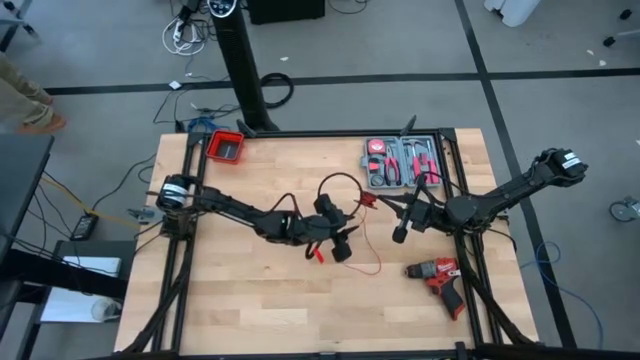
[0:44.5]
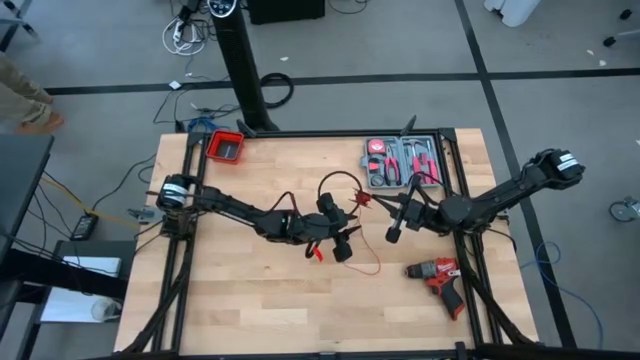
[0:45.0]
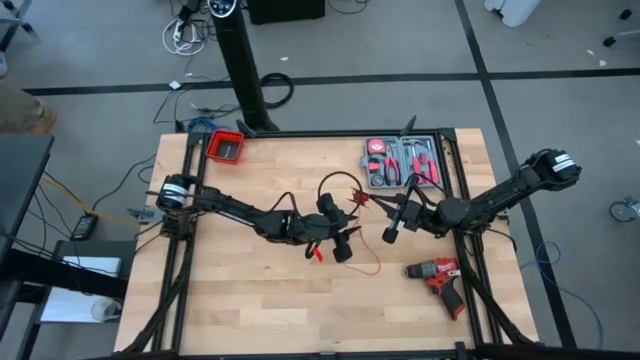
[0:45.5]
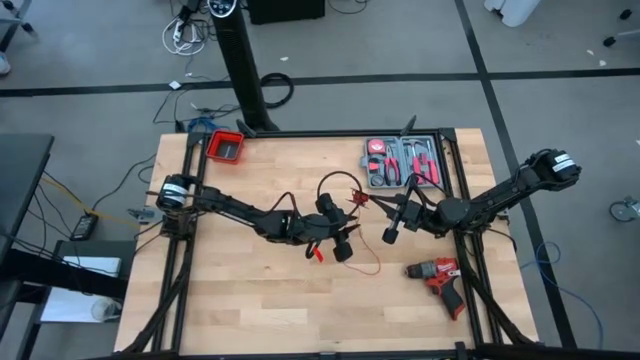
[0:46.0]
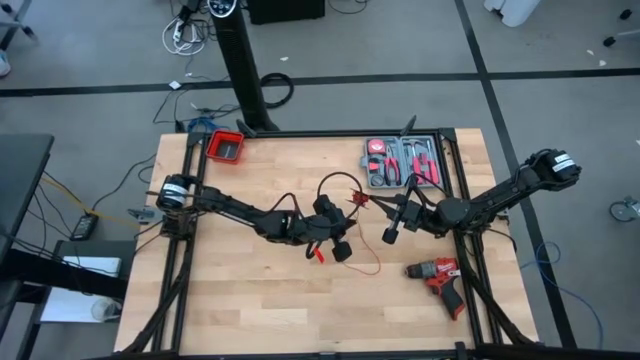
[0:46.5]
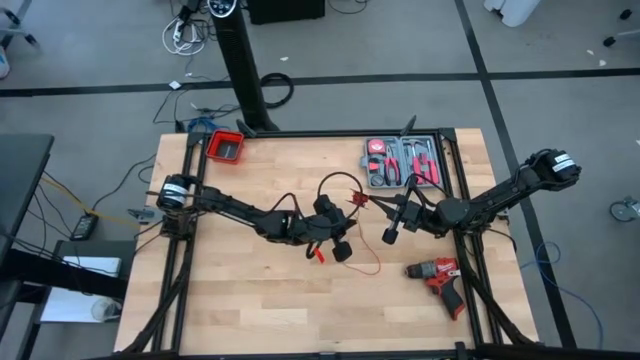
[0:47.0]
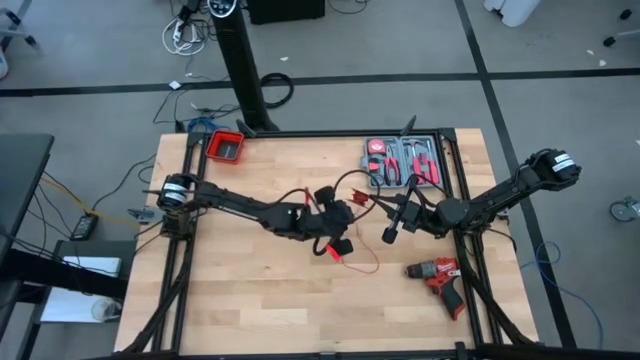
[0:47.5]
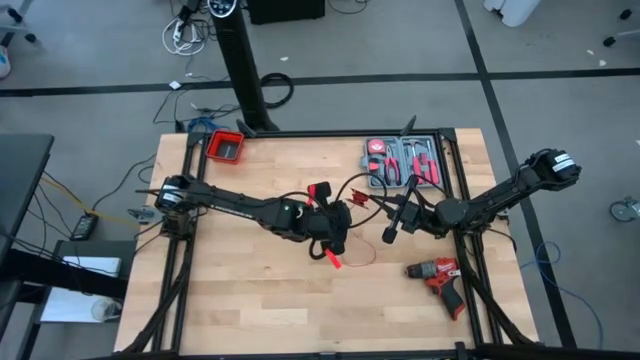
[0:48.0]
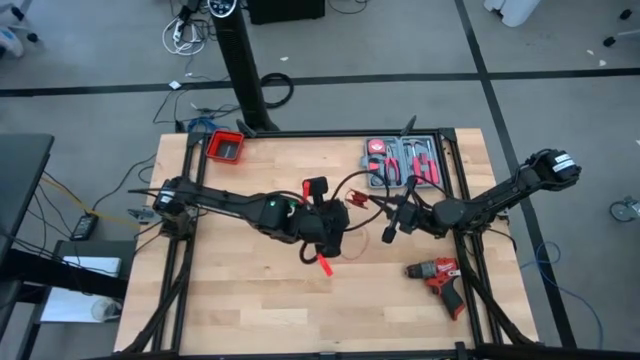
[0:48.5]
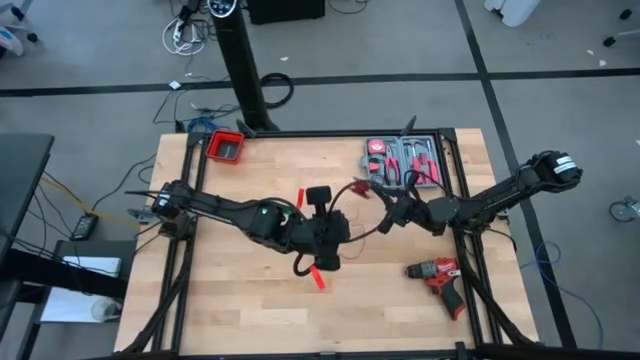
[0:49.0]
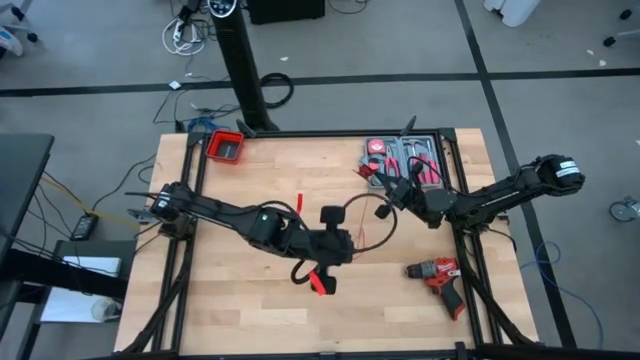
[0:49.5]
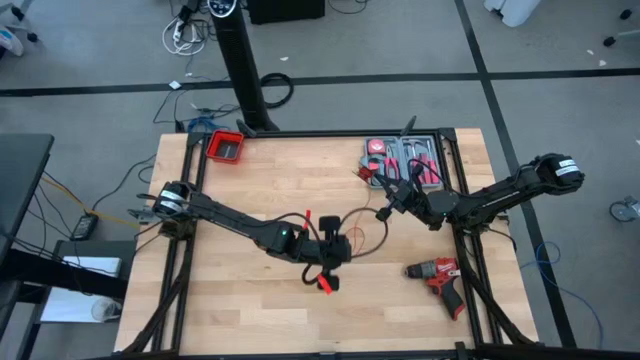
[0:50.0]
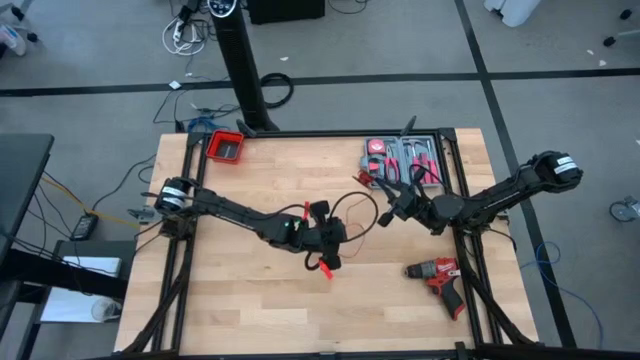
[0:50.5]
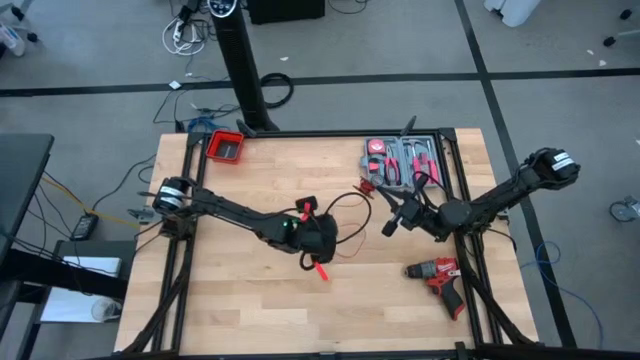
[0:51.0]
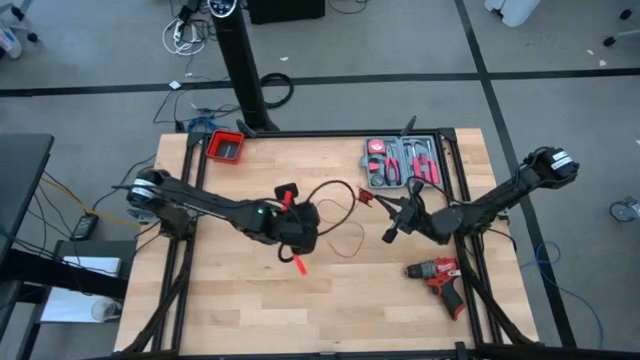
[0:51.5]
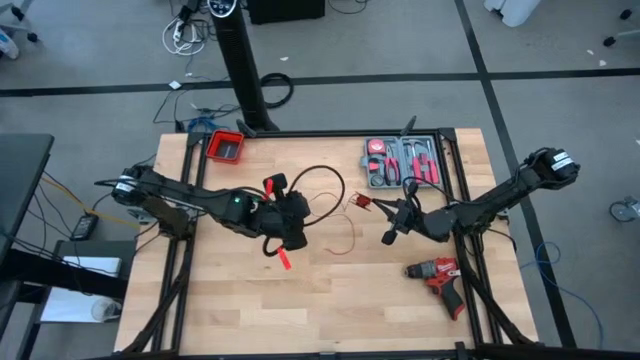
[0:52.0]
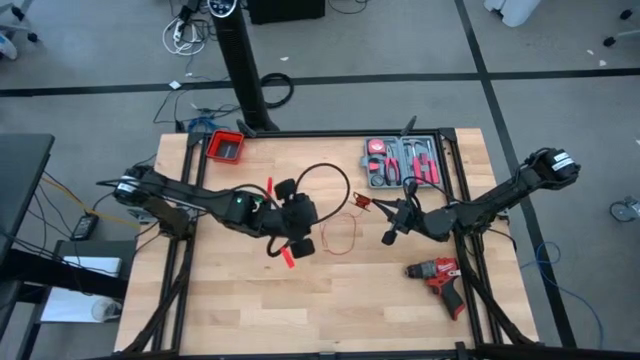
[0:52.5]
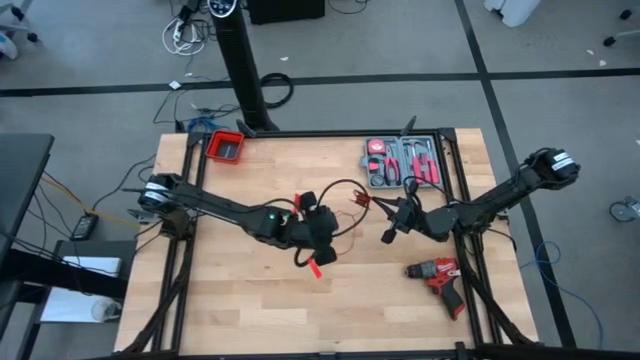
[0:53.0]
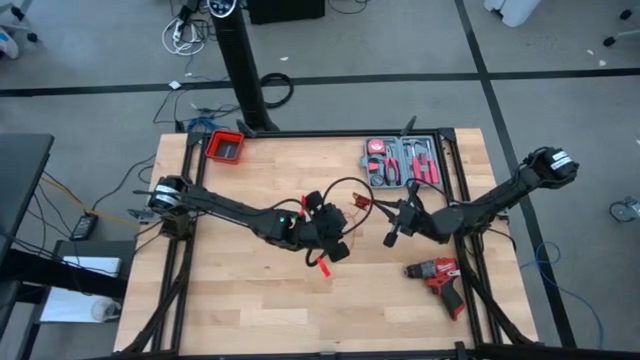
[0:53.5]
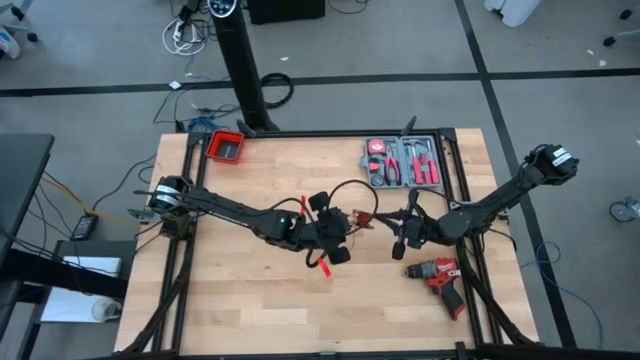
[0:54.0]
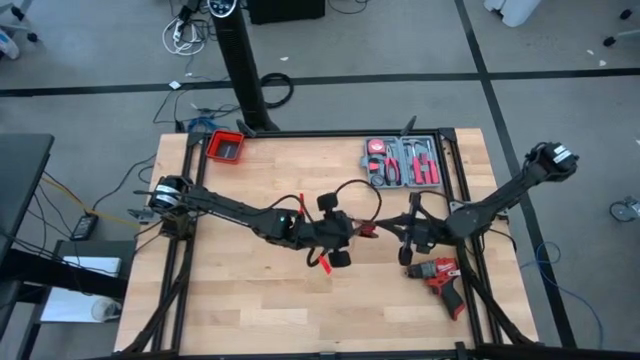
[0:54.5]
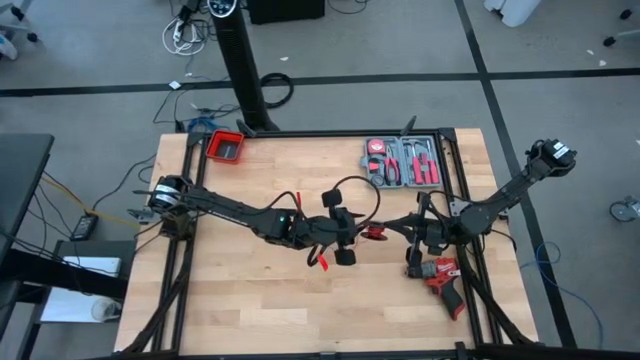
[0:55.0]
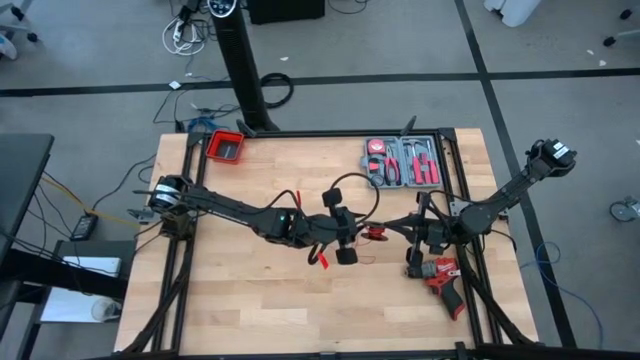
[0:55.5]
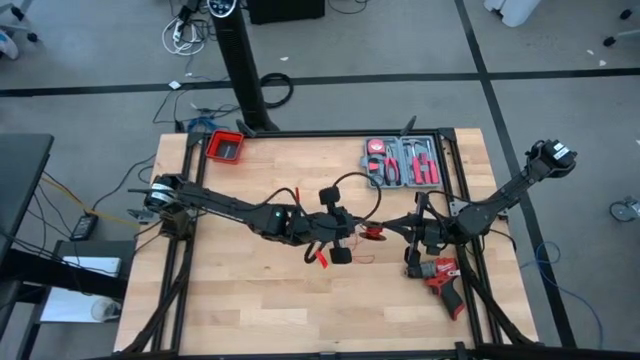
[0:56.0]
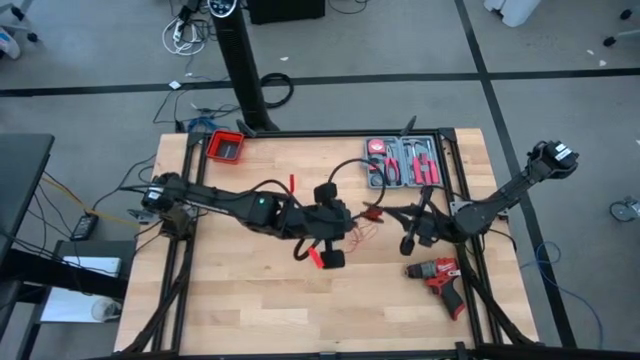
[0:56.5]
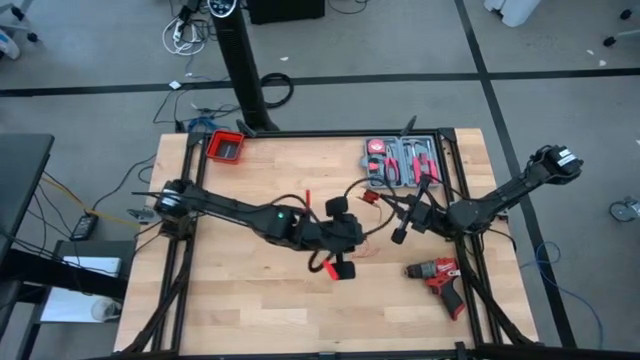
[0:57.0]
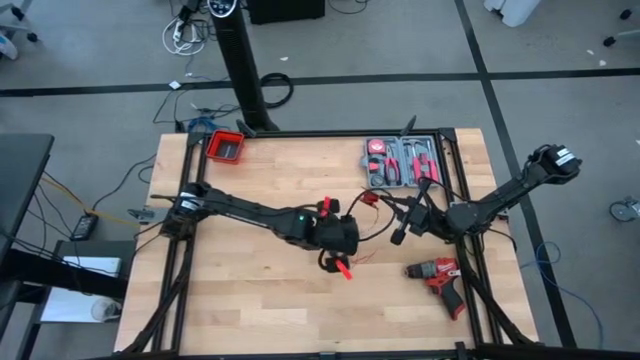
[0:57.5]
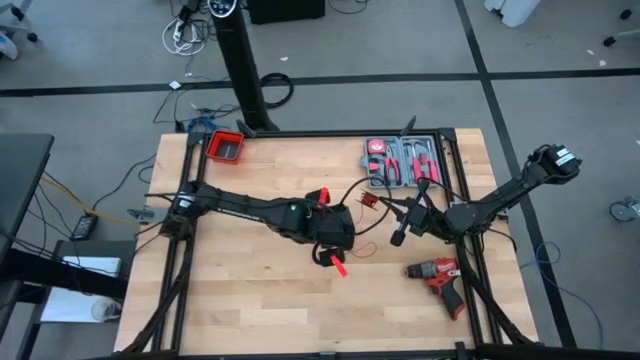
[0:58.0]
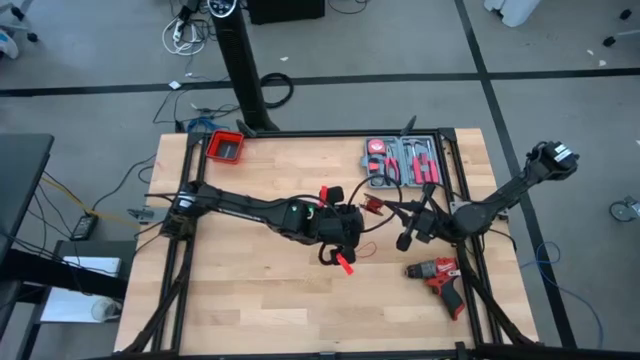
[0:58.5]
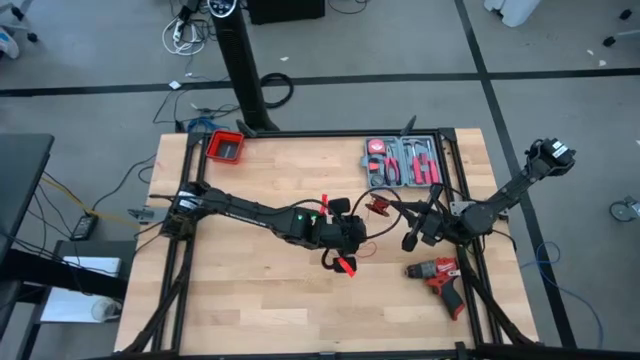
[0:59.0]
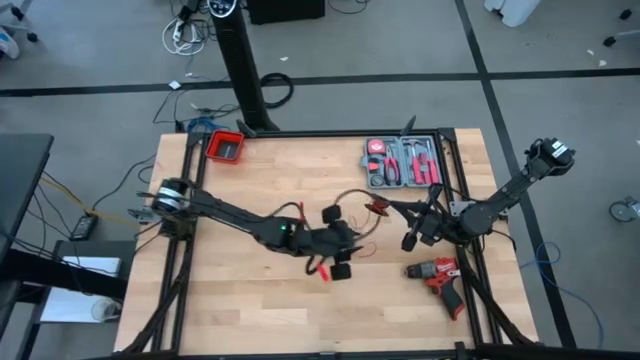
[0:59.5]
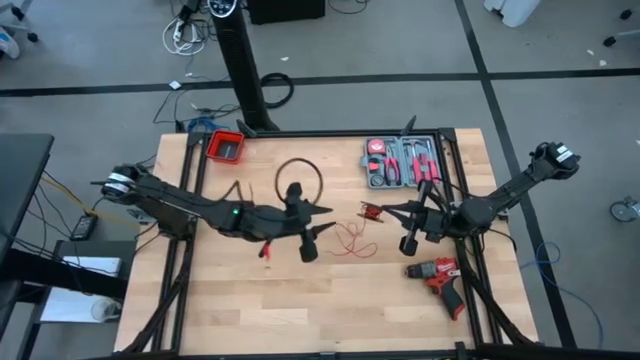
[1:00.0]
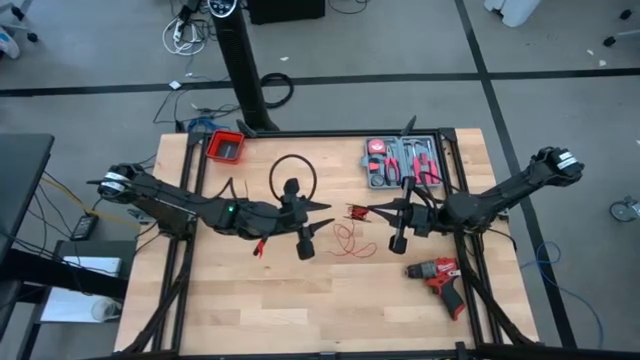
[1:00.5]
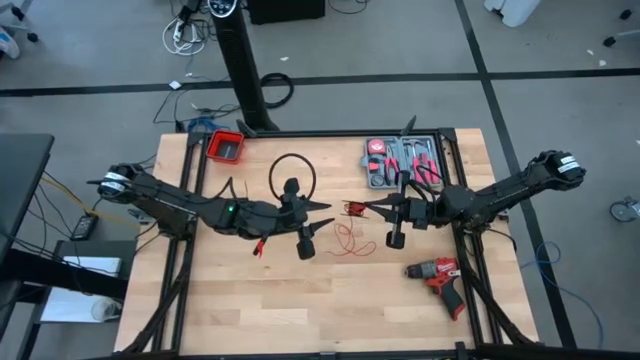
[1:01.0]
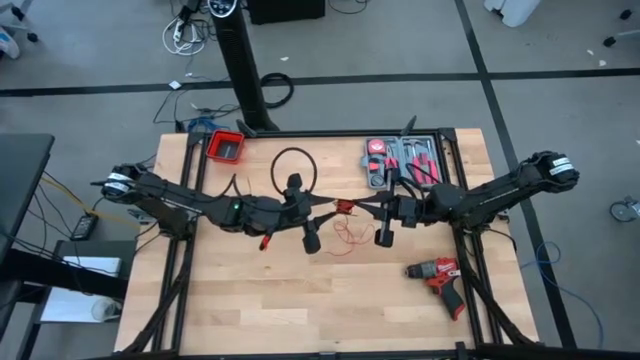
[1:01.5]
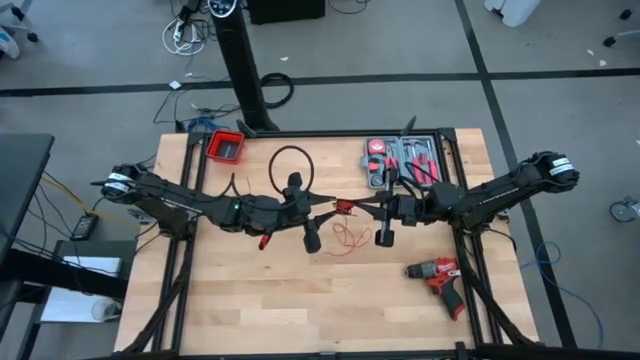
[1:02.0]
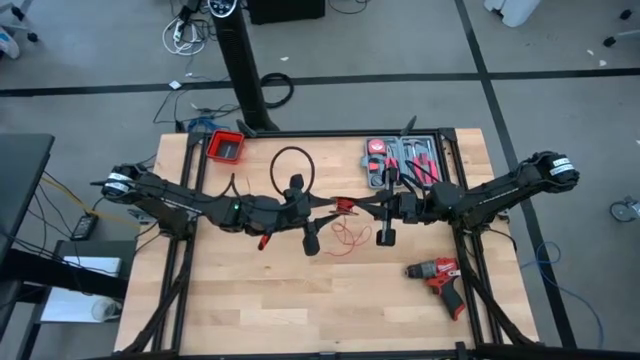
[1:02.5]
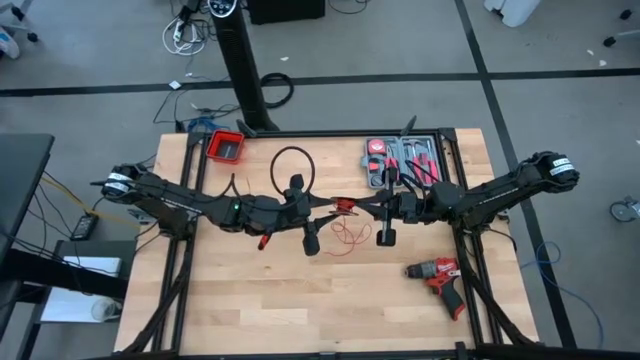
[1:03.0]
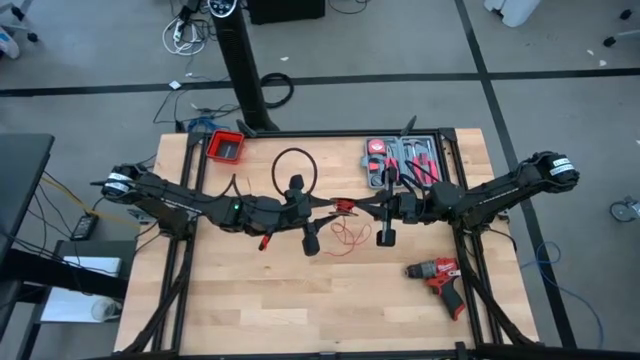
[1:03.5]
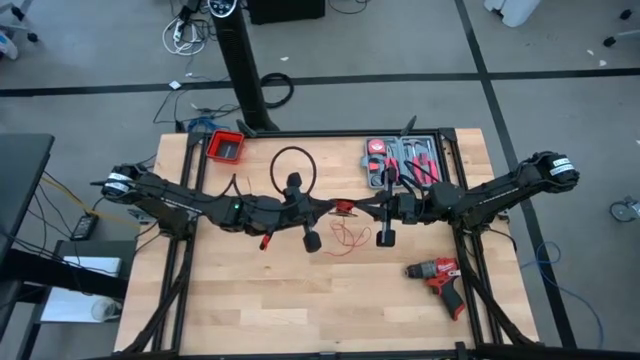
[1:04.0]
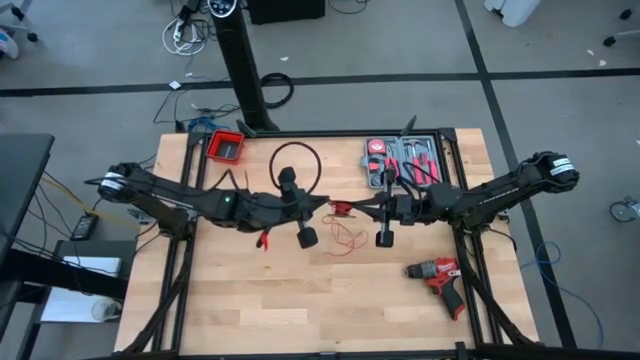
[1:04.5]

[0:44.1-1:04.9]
Task: Coil cords
Uncoil the red wire from the black spool
